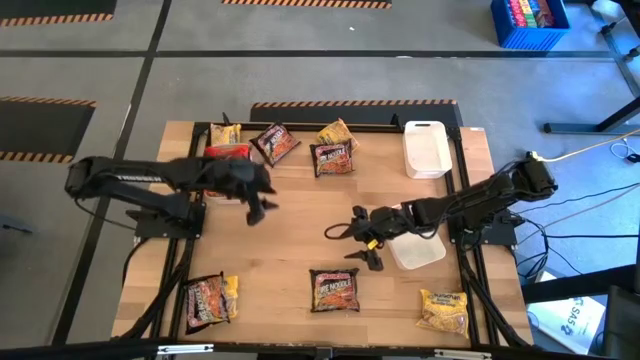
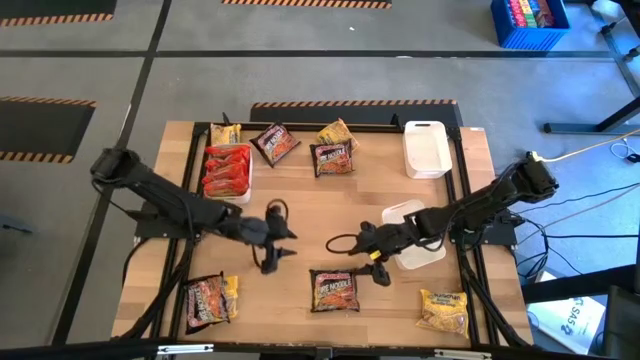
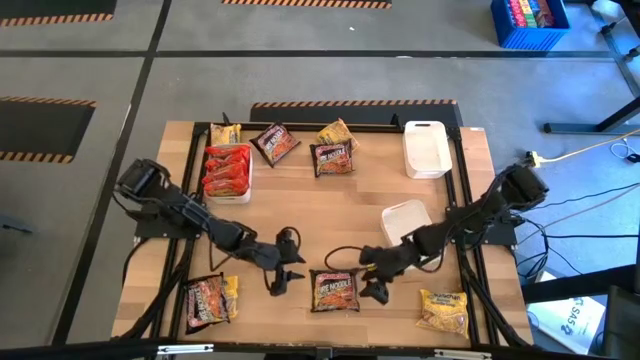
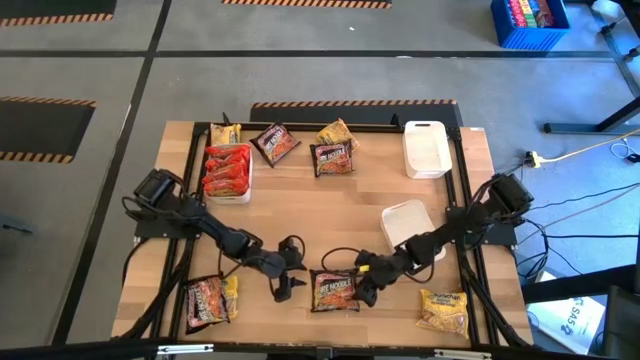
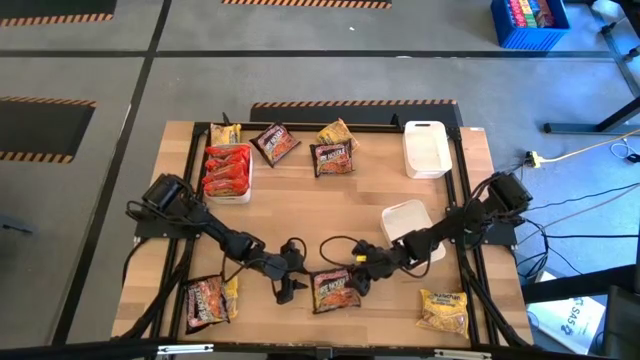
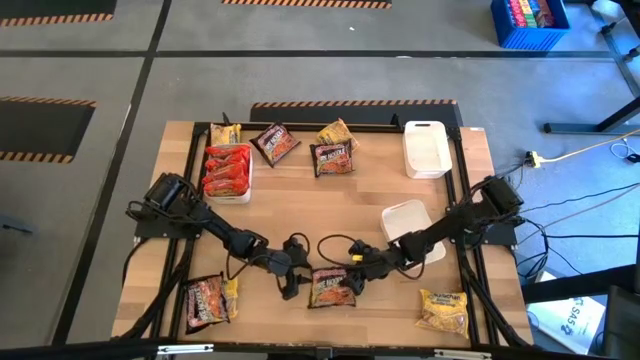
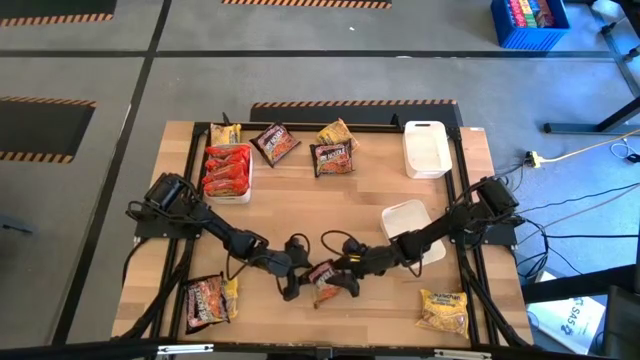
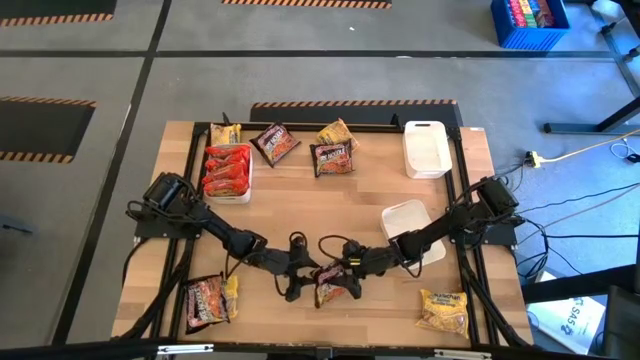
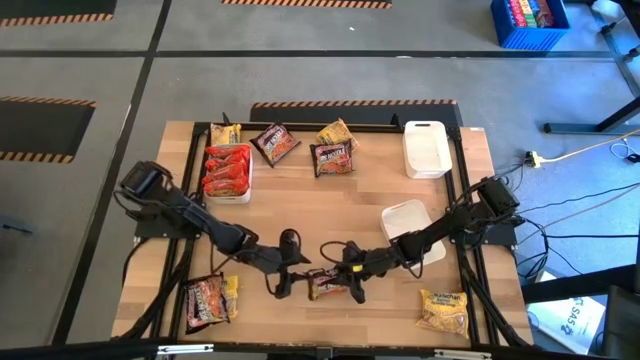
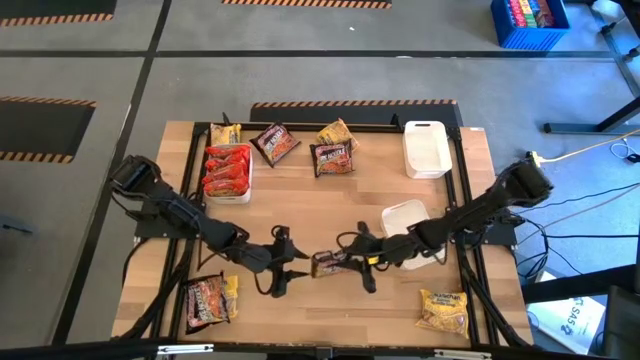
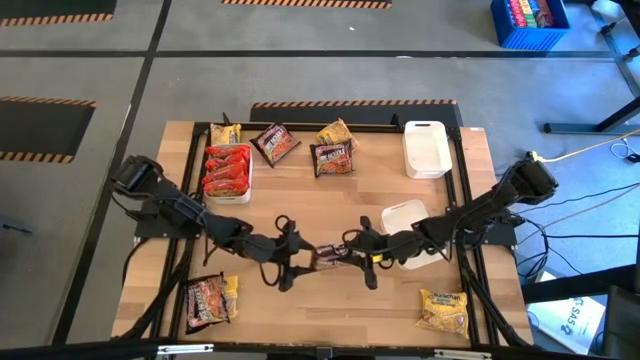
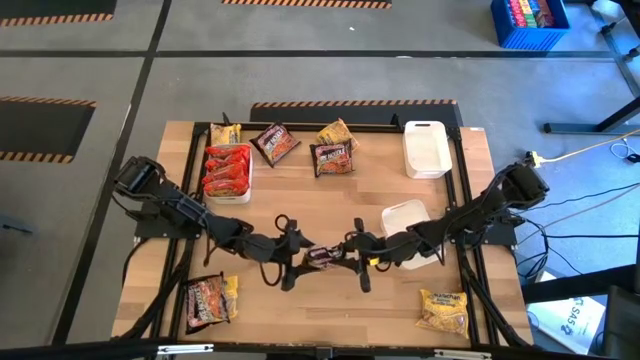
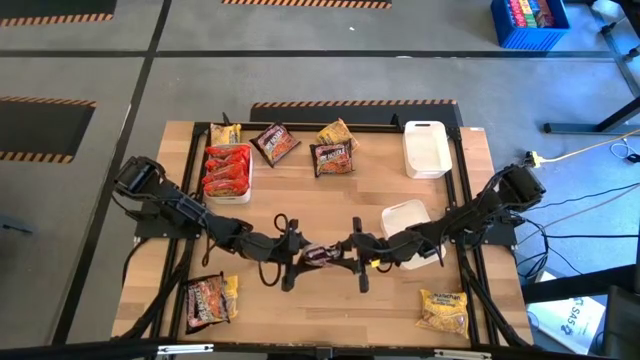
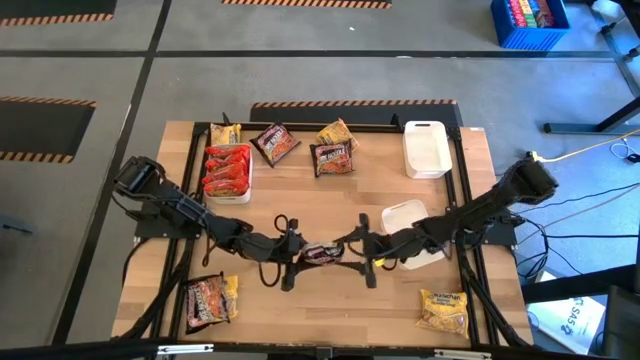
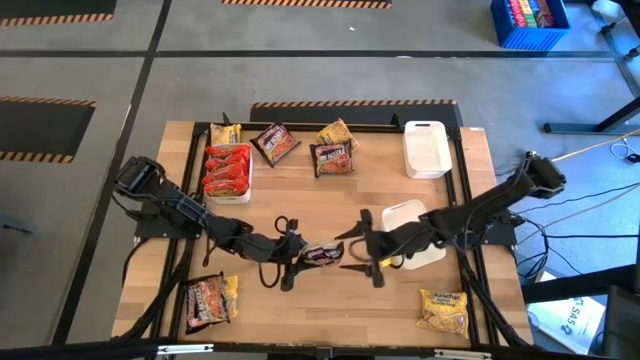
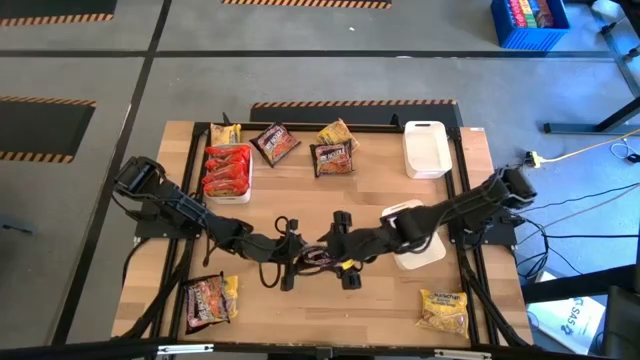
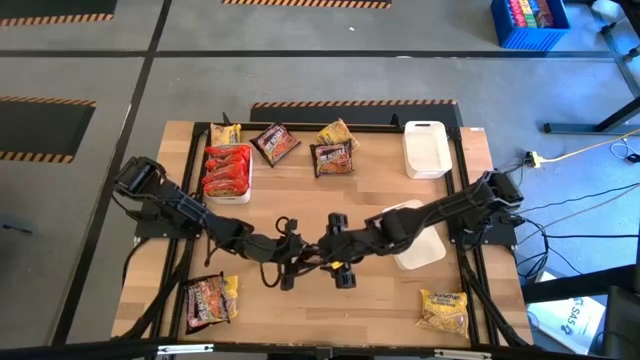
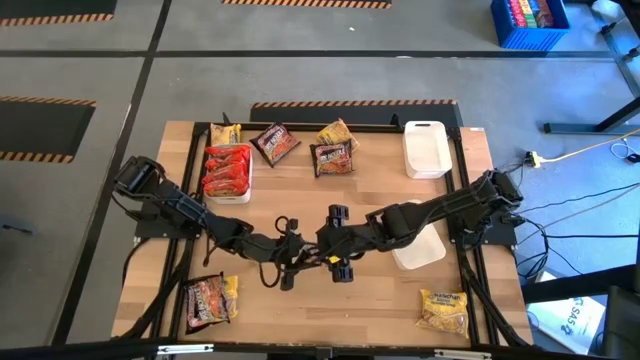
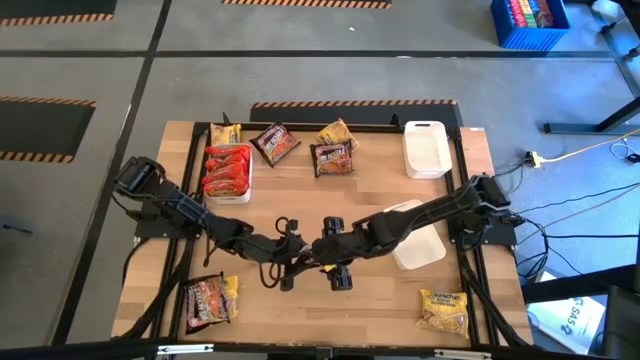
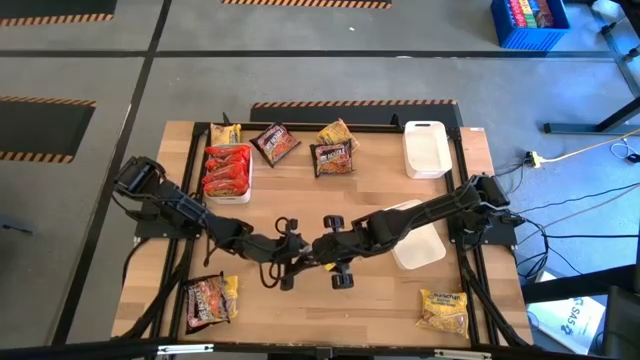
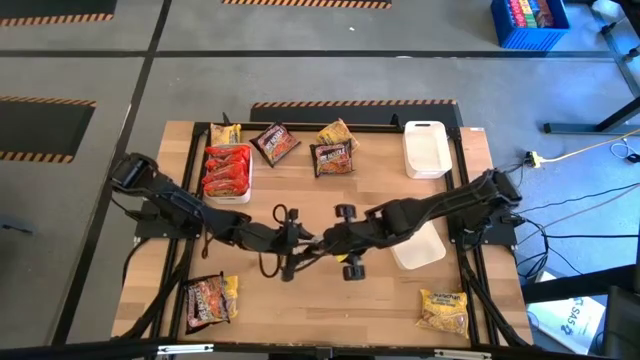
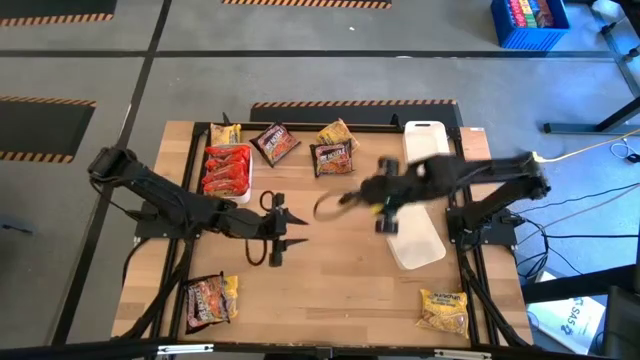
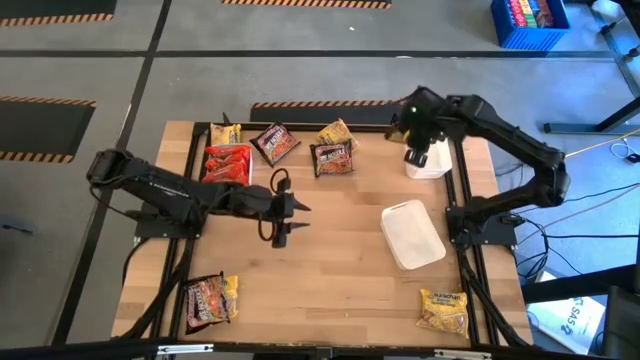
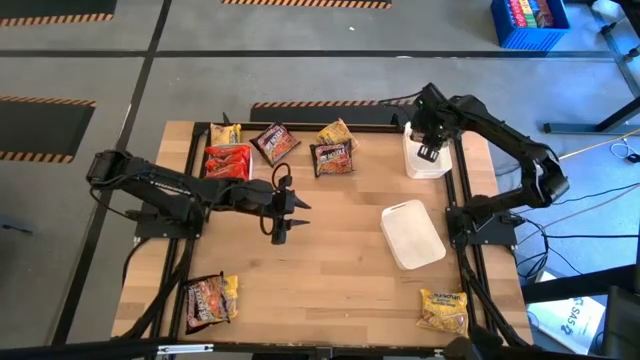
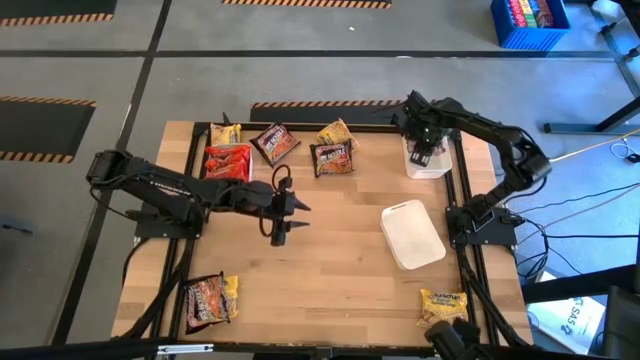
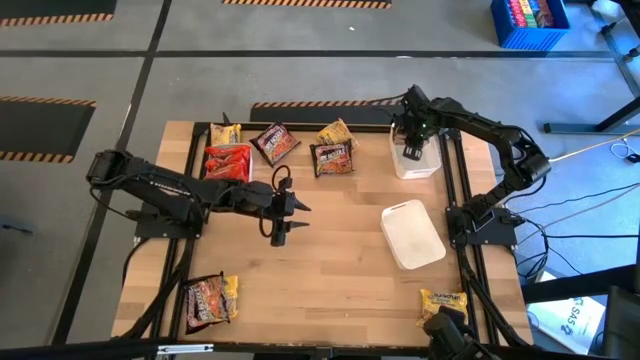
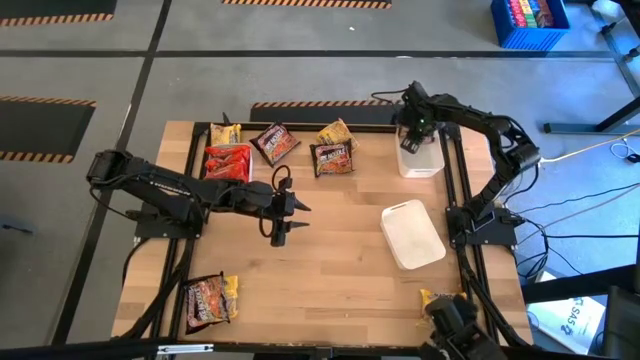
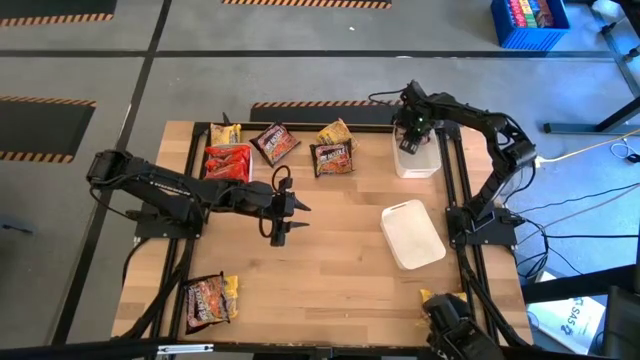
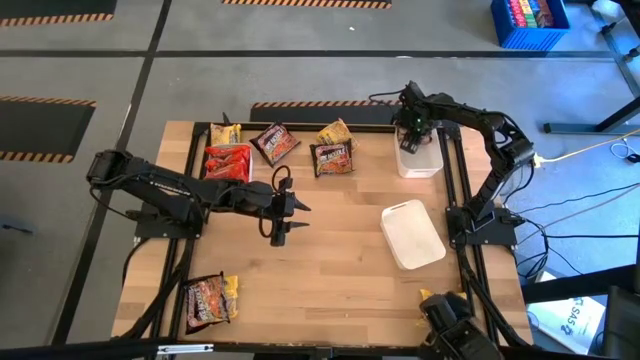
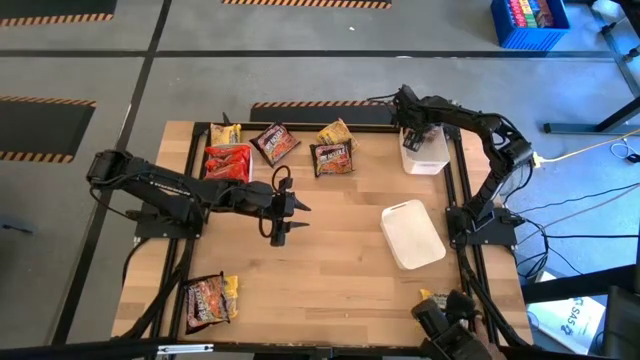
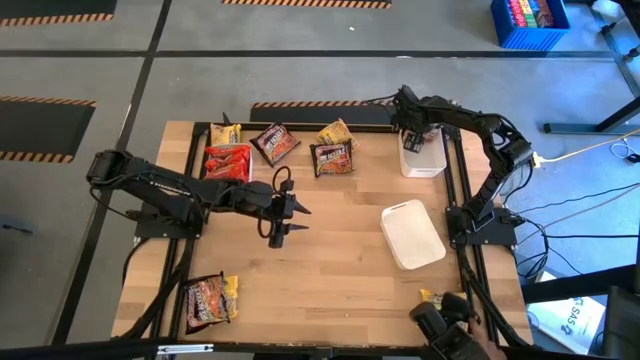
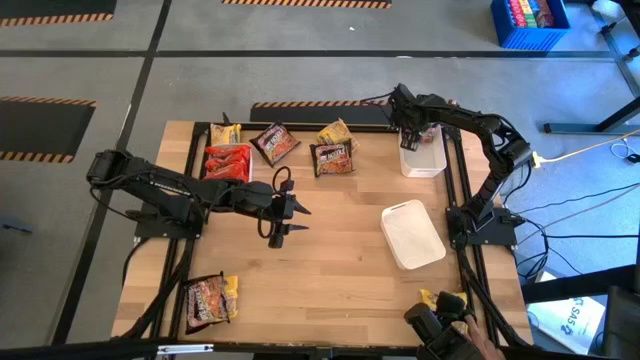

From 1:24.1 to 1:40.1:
Task: Sort Maruchan noodles
Put the bottom center black noodle into the top right white bin

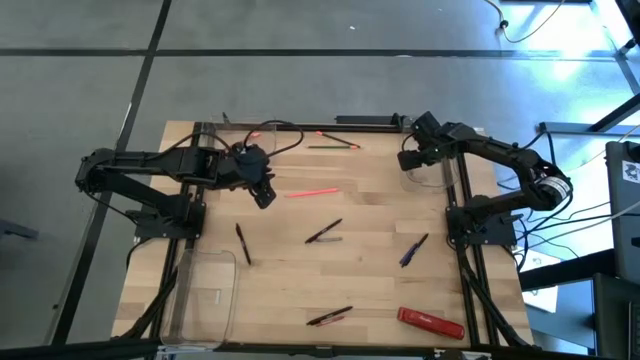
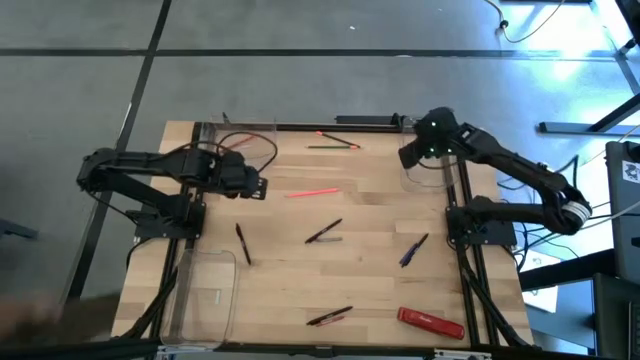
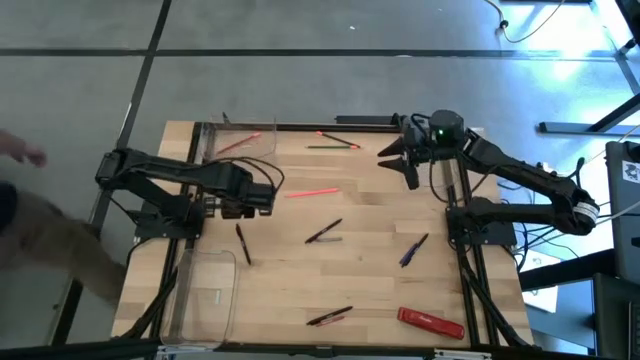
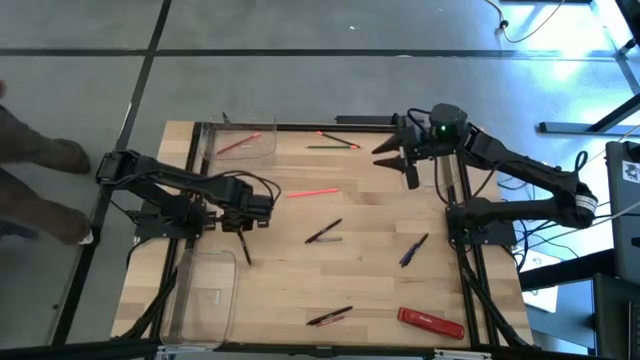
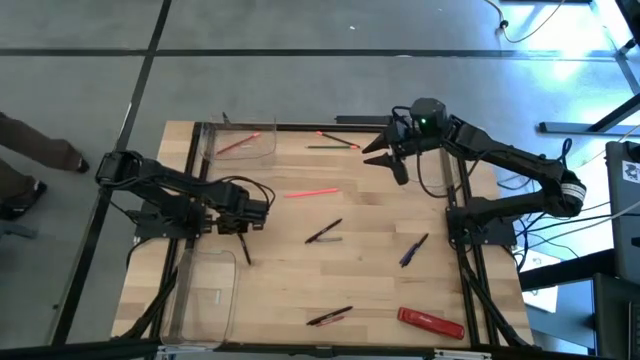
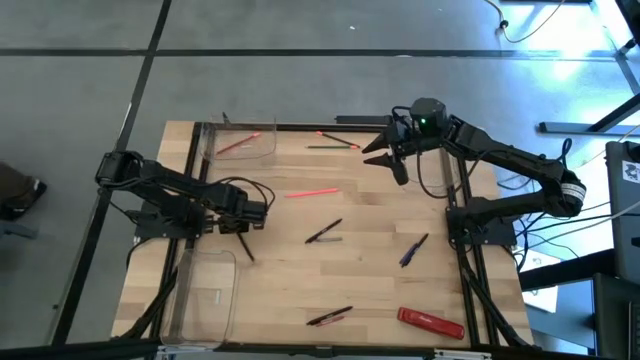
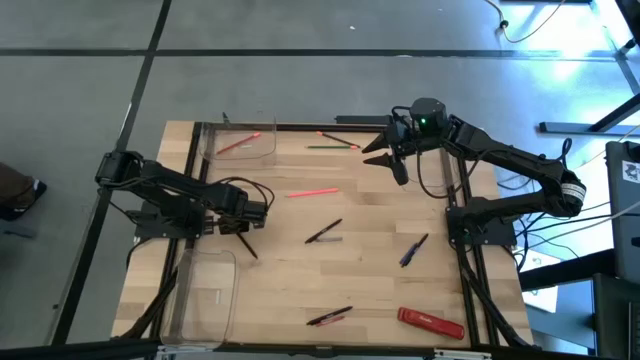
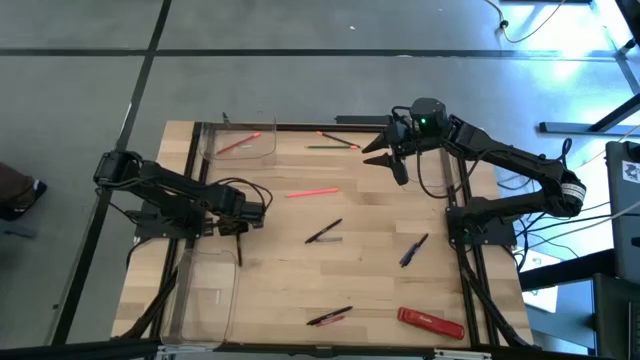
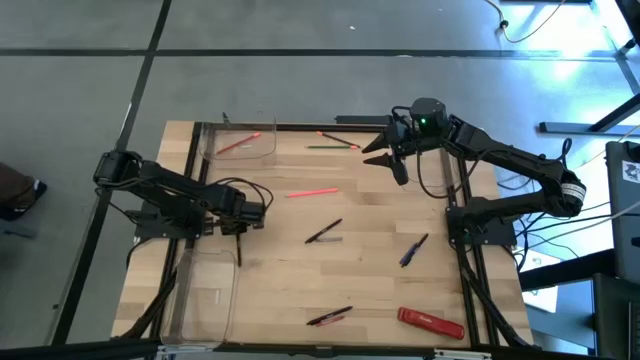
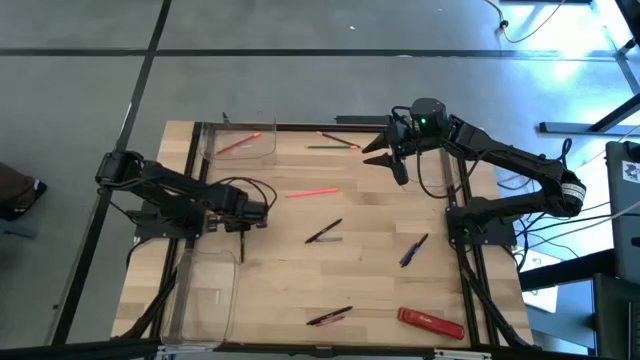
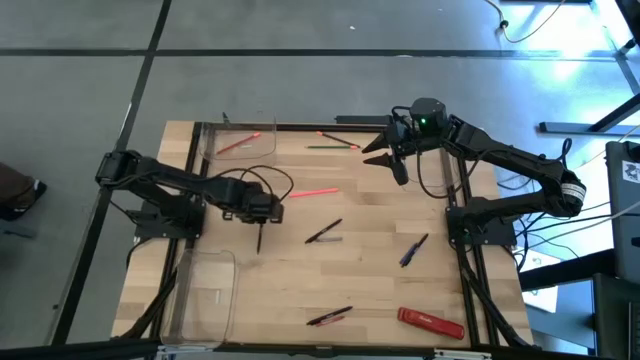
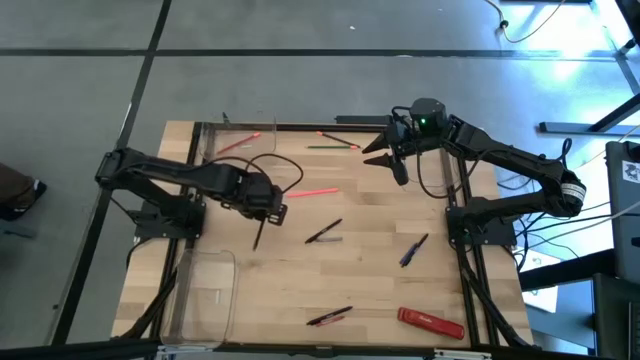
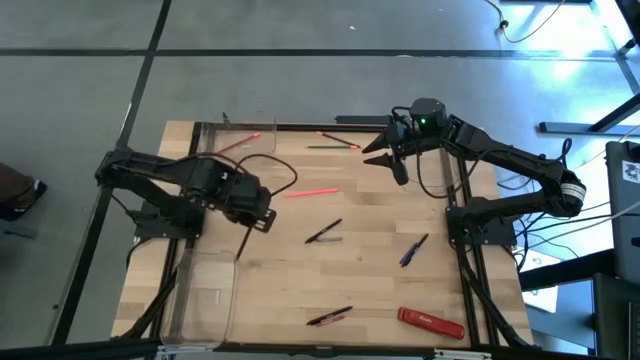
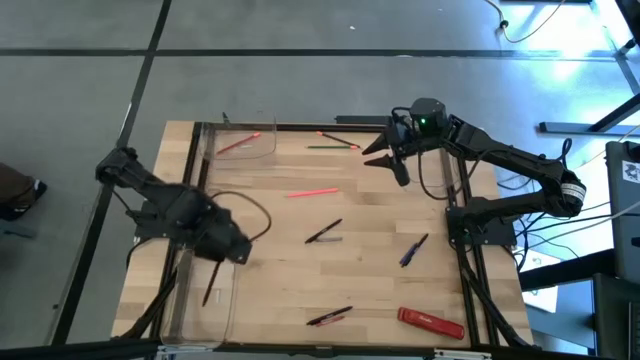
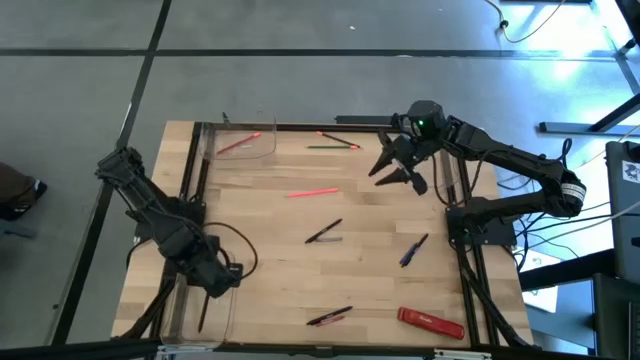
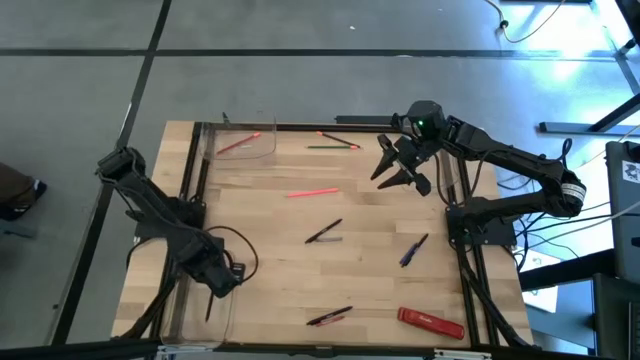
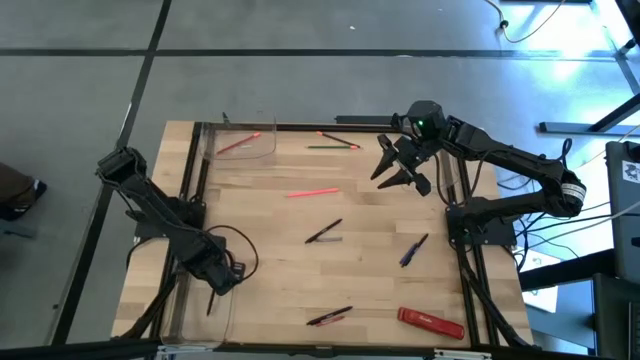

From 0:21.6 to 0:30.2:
Task: Sort crayons/erasers/pens/pencils in bins
Put the left black pen into the bottom left transparent bin
